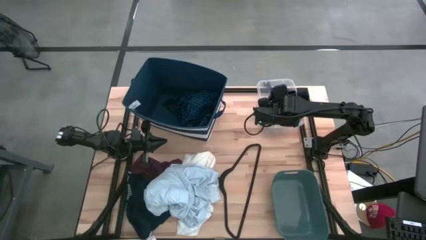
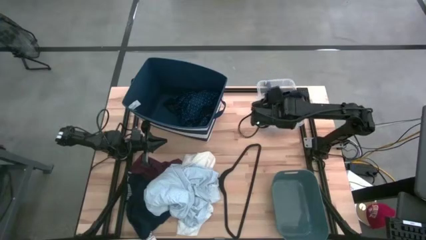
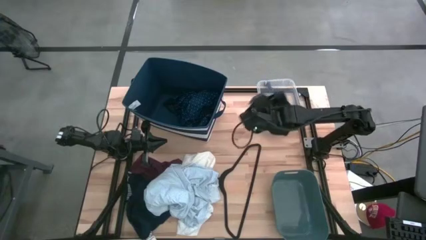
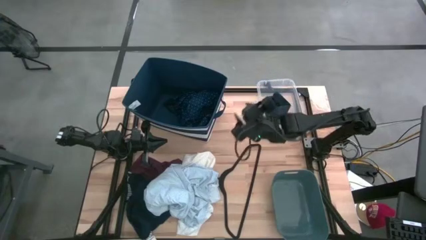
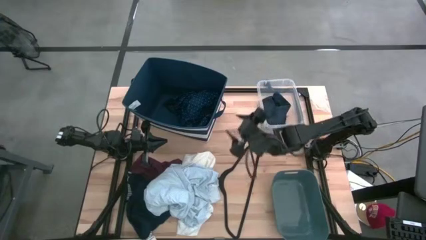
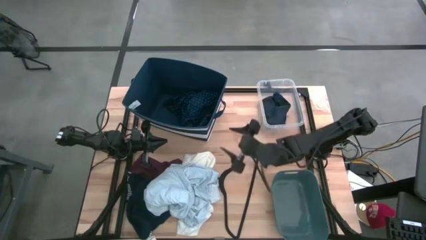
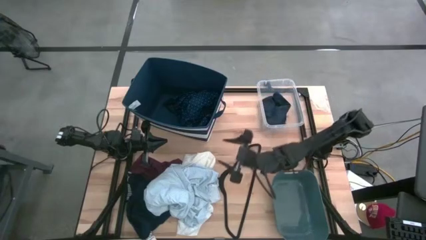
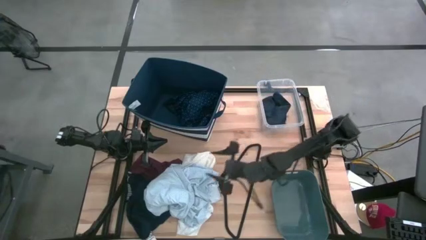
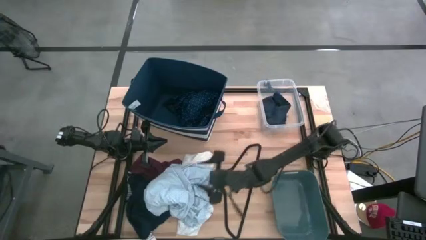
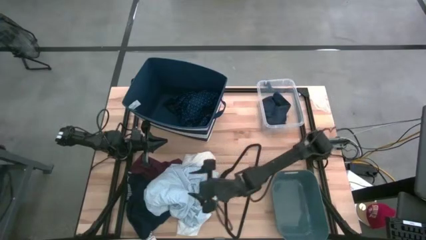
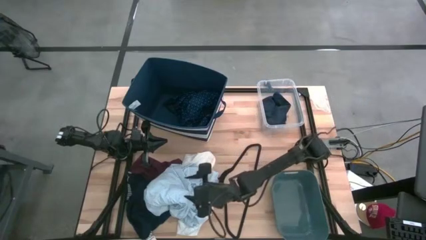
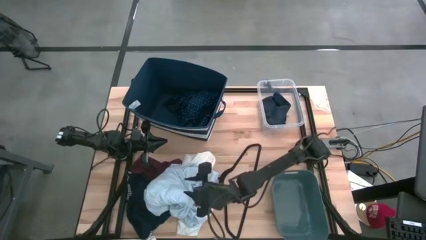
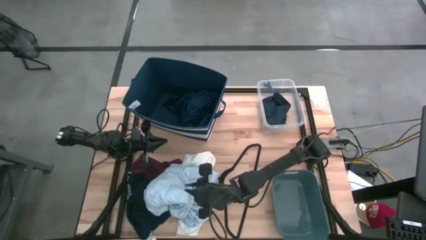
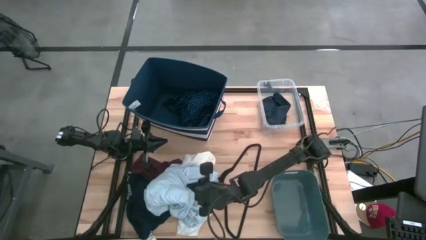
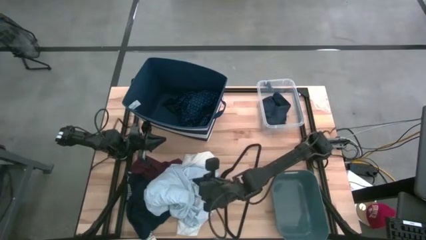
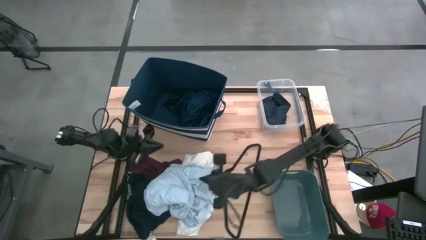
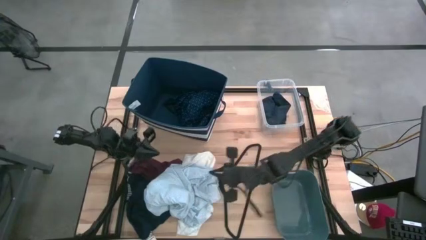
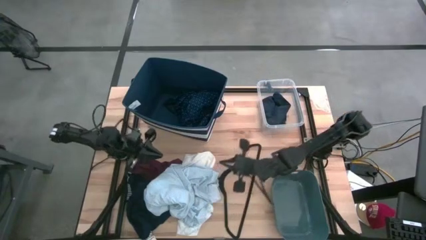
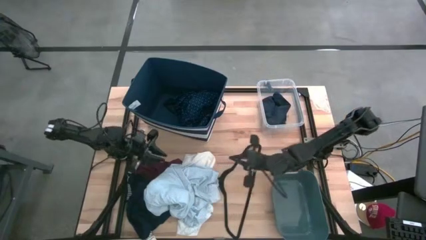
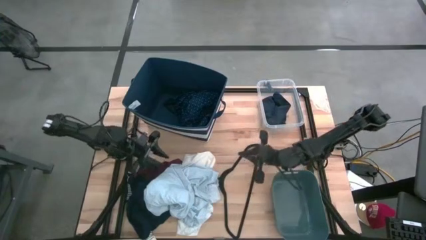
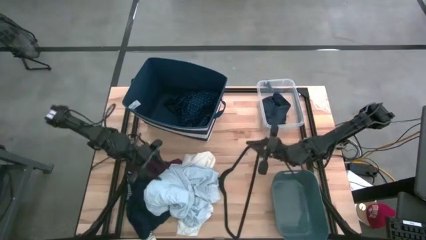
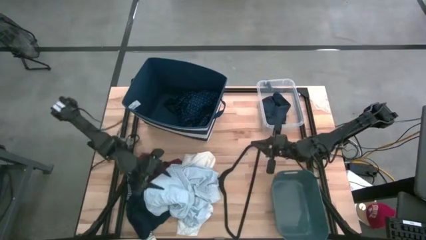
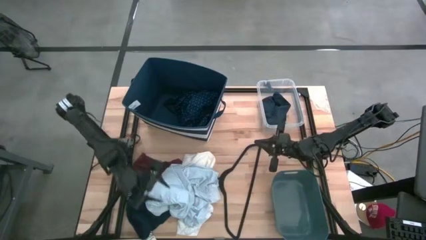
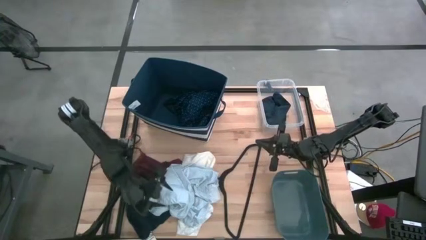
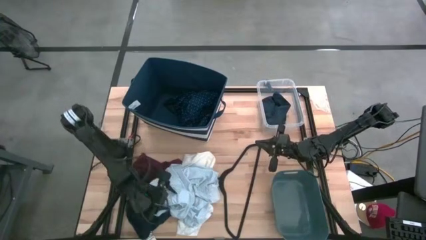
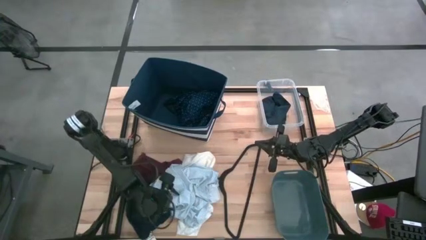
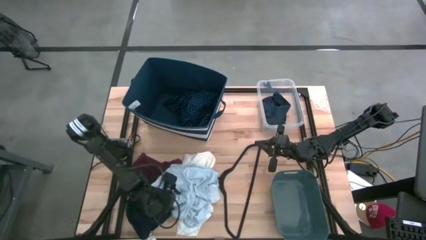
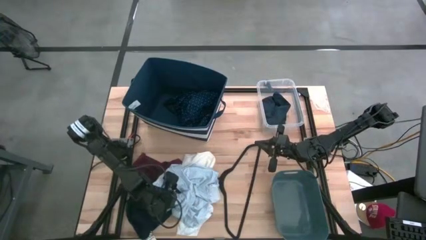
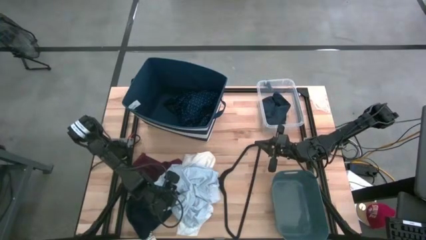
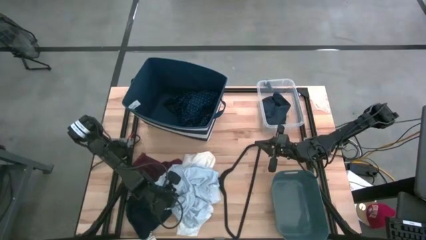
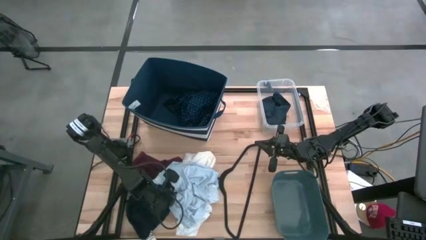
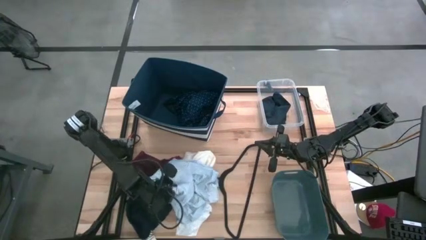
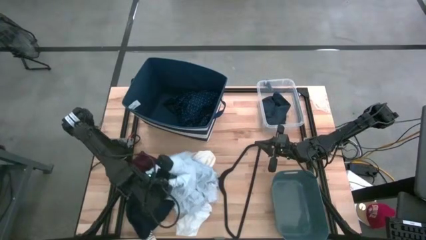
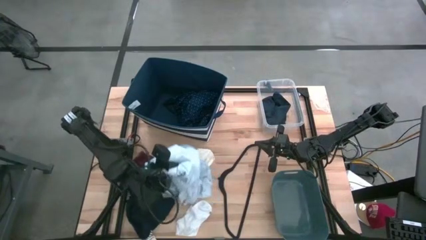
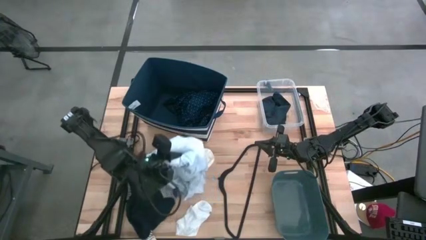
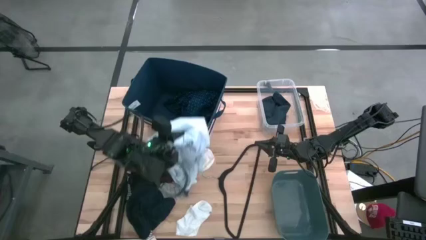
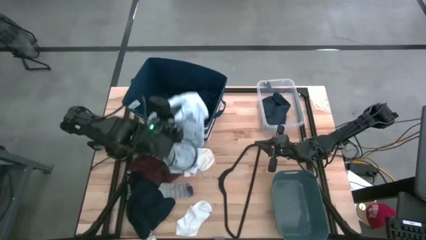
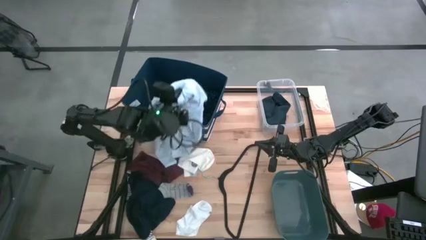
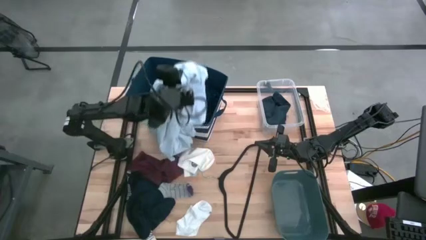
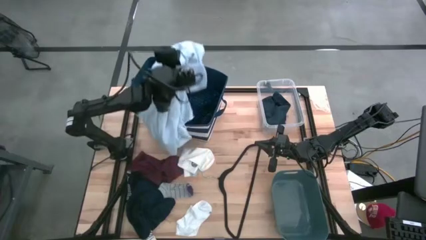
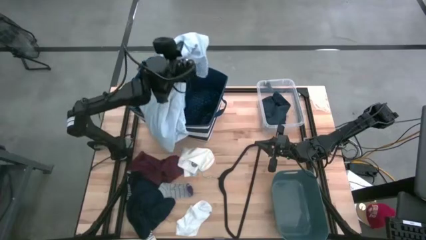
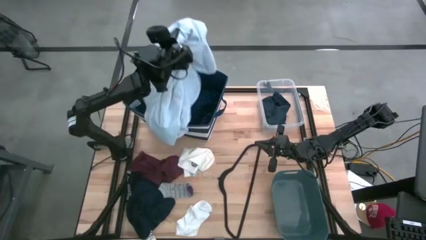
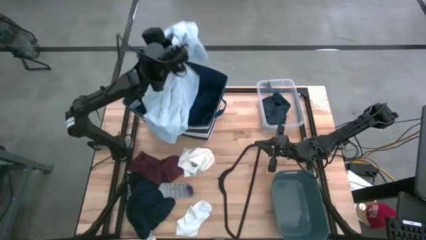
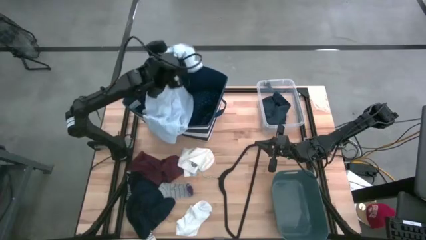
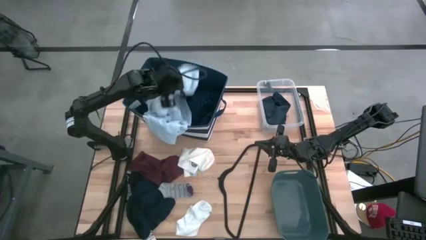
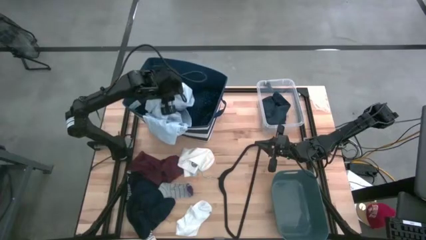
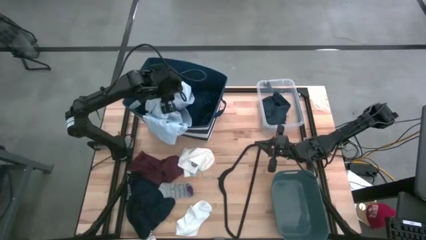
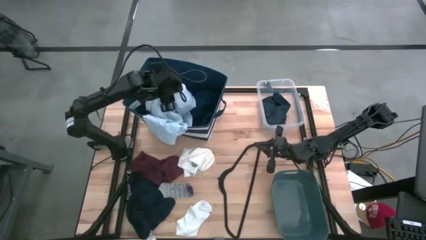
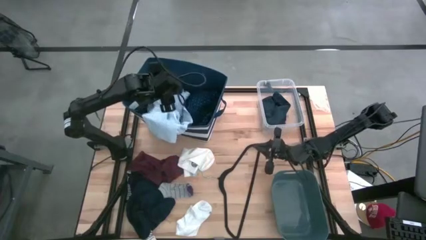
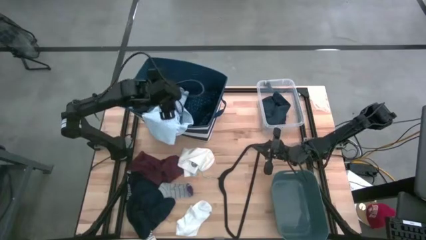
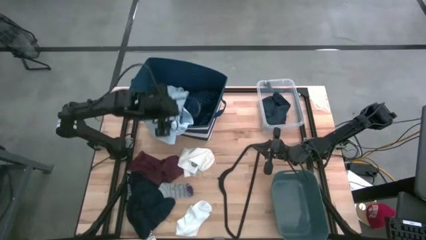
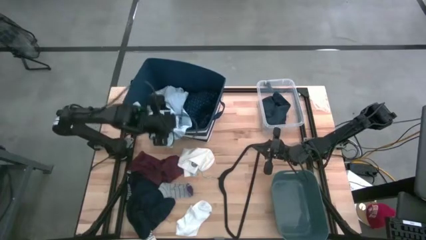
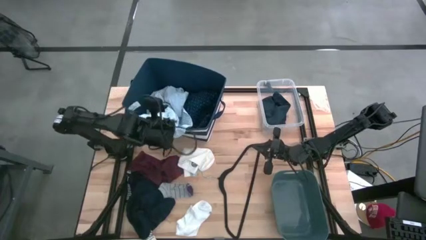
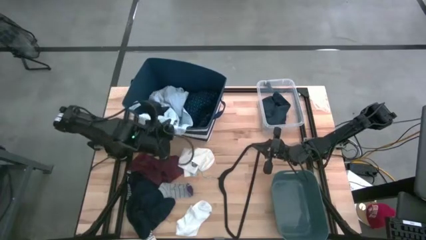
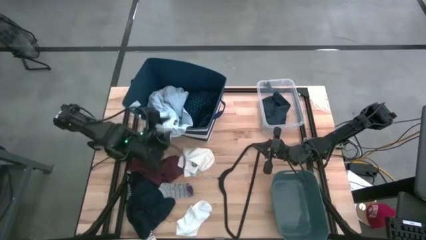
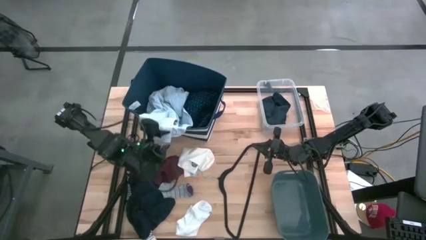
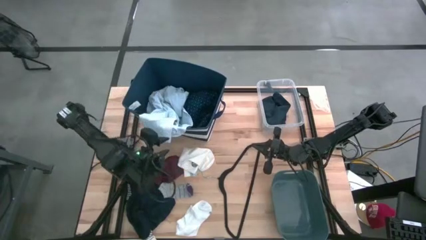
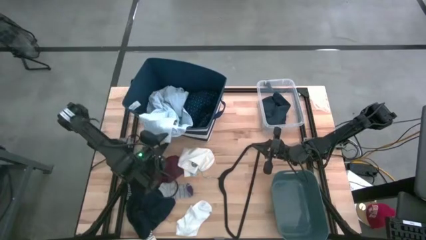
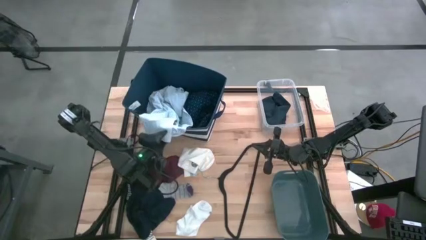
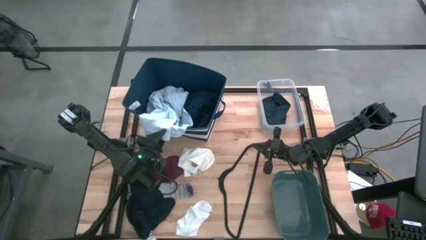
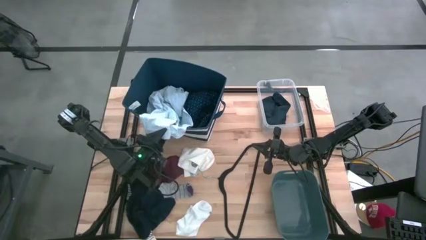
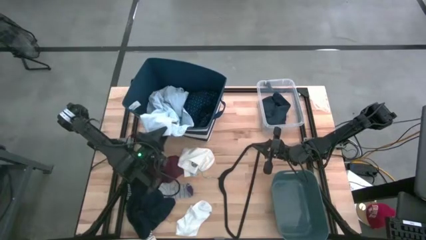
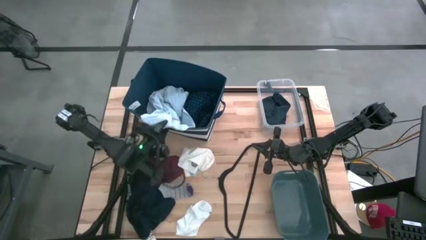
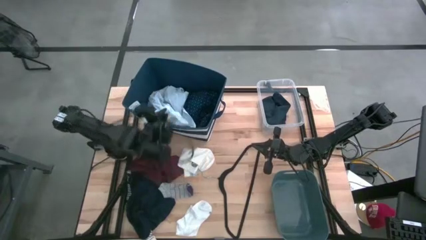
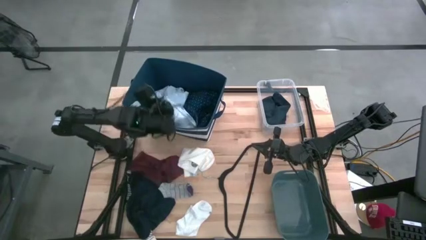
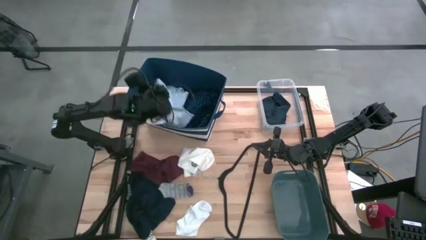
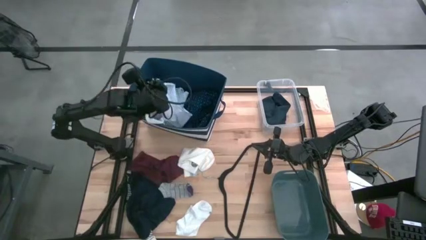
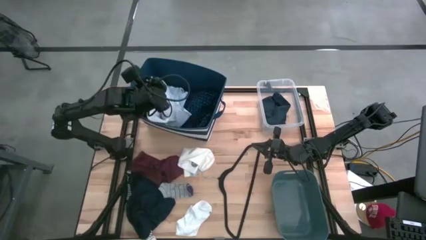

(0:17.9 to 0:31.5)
Task: Pick & Place Cloths
Put the white polo shirt into the blue bin
